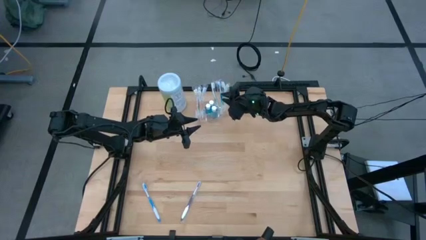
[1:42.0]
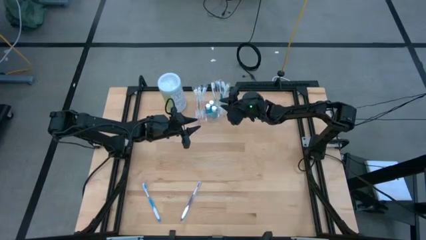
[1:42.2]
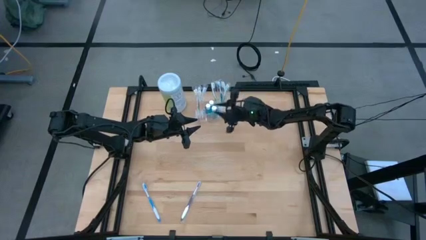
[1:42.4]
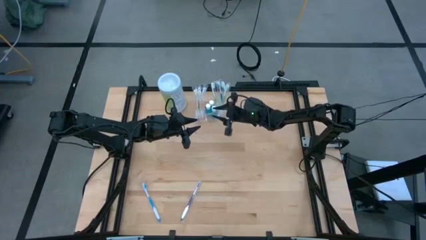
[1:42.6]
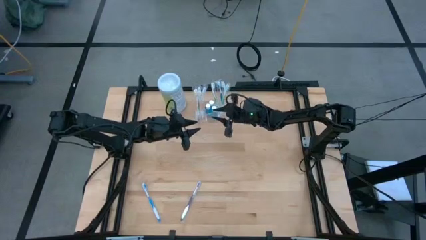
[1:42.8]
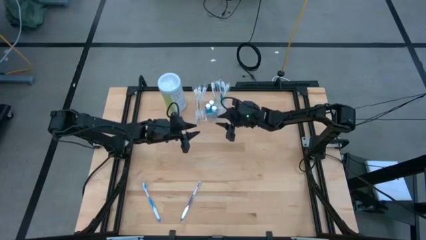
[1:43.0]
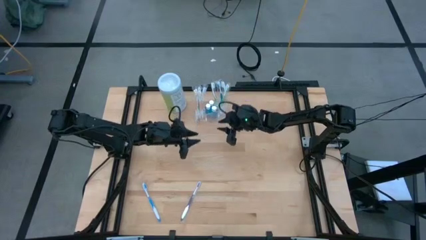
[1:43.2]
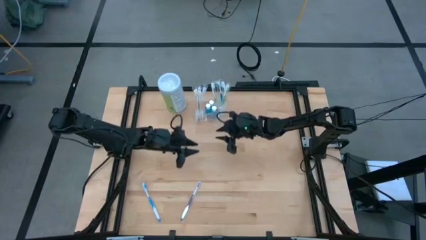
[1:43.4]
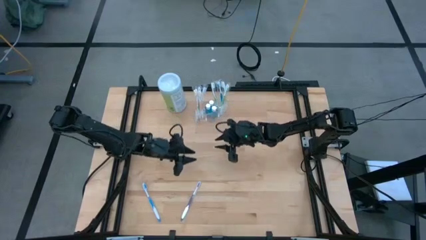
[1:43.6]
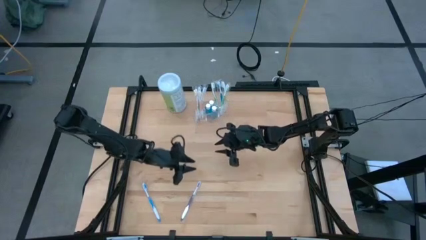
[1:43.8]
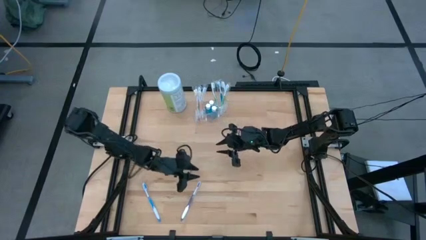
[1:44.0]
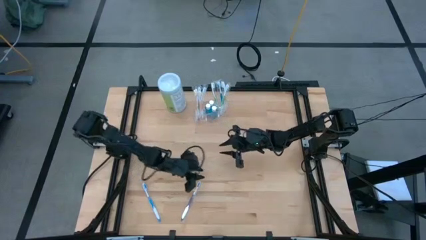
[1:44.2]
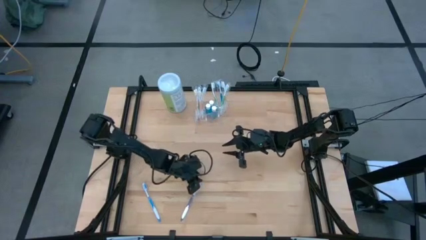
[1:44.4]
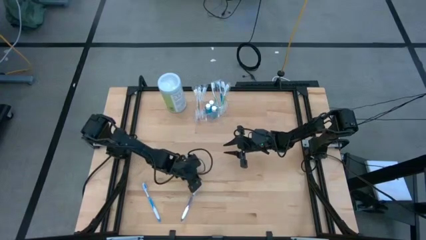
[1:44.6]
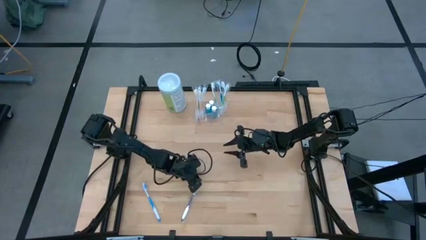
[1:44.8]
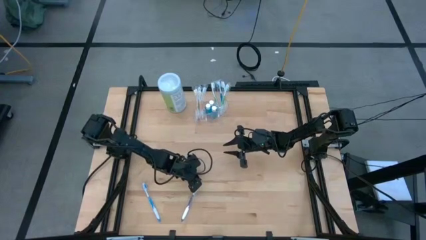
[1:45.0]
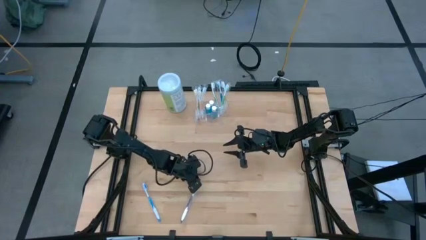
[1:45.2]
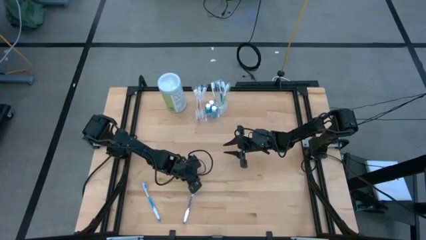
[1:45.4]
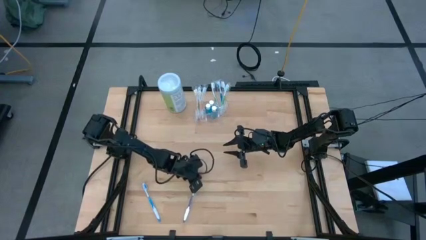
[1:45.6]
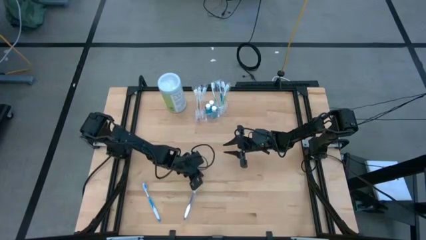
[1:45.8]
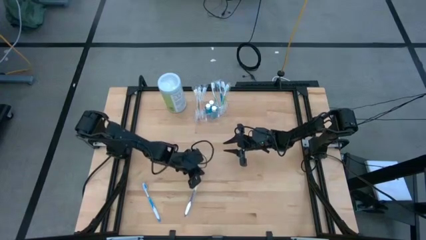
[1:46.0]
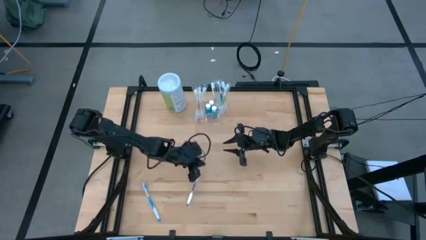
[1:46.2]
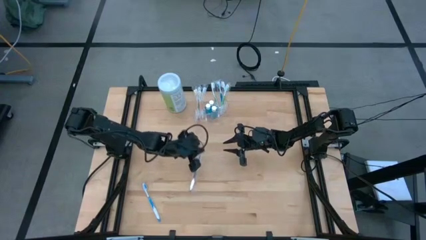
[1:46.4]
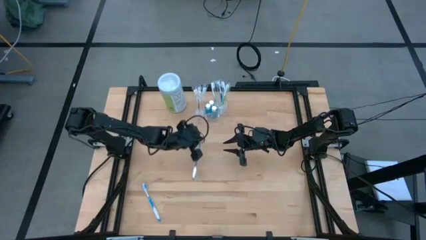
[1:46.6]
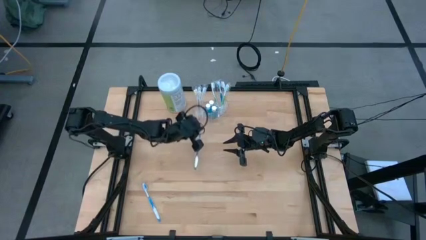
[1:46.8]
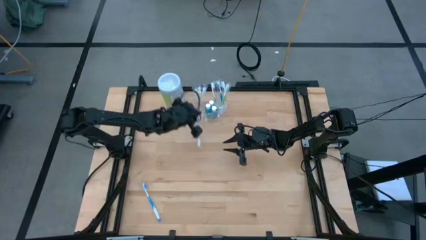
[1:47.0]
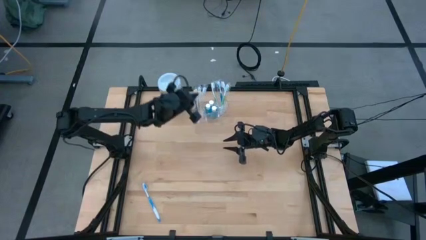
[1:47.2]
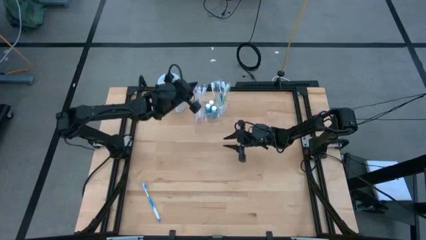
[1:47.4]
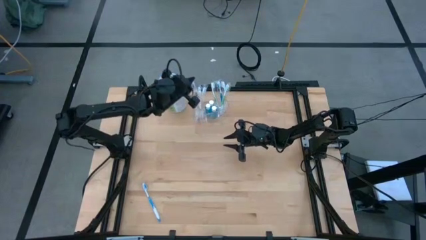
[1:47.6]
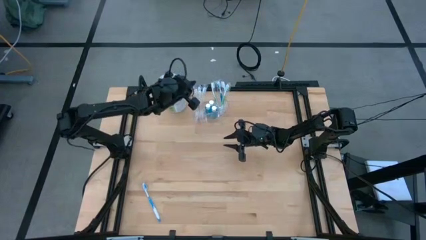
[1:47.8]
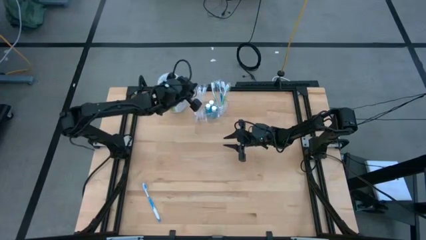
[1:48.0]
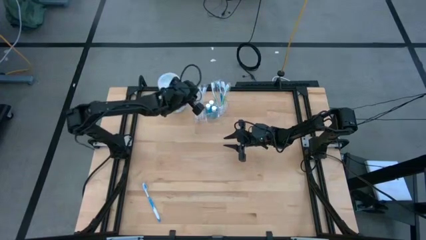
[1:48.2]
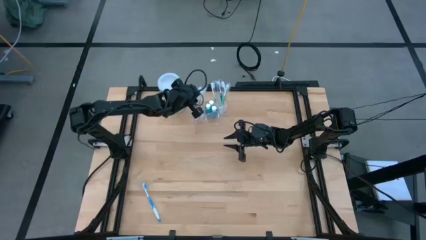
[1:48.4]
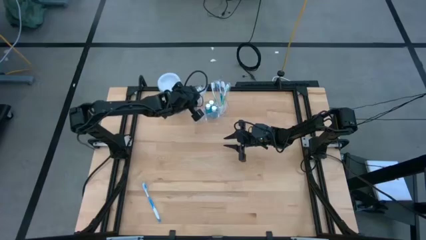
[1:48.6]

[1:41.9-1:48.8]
Task: Pick & Place toothbrushing station
Put the purple toothbrush into the transparent organizer

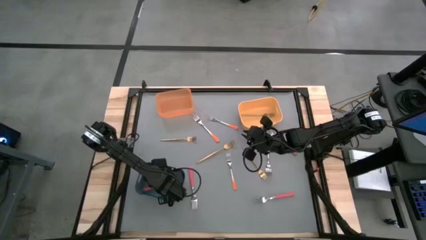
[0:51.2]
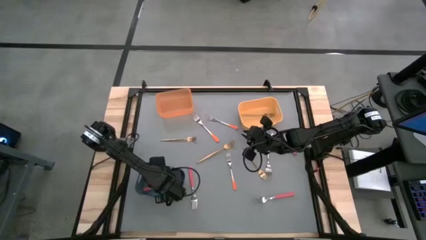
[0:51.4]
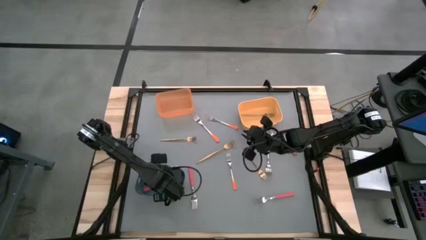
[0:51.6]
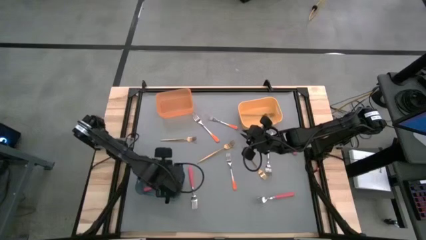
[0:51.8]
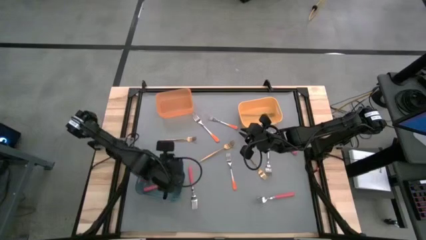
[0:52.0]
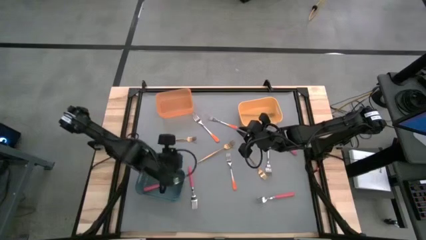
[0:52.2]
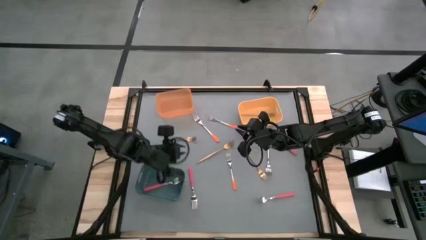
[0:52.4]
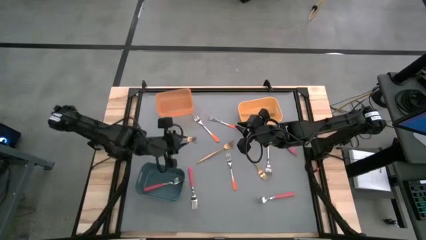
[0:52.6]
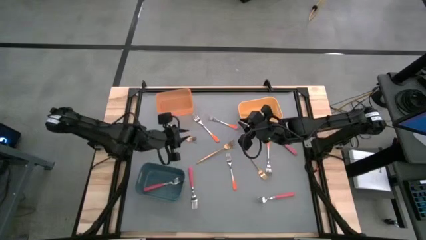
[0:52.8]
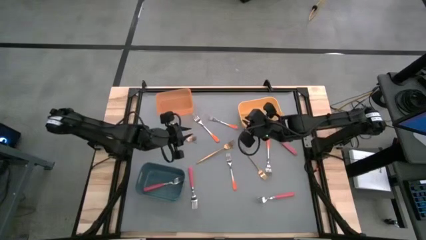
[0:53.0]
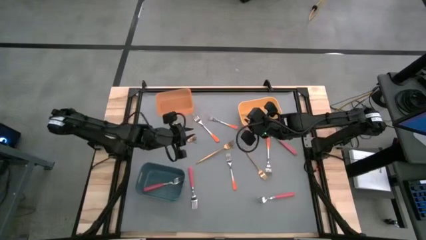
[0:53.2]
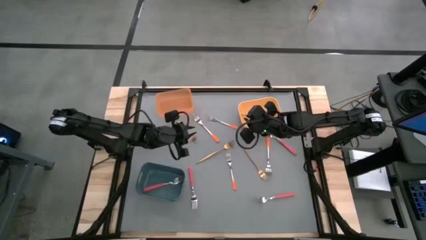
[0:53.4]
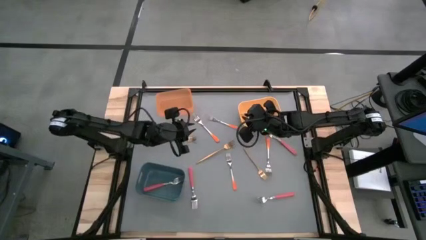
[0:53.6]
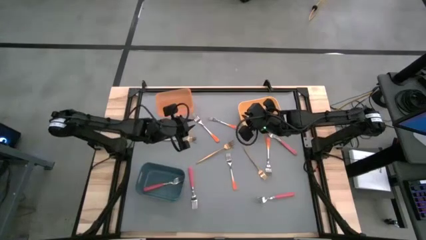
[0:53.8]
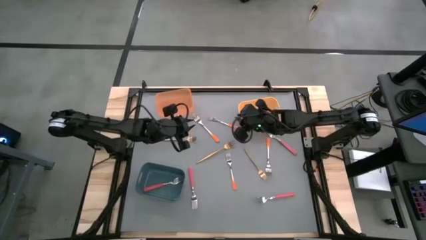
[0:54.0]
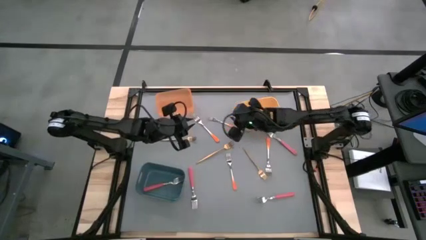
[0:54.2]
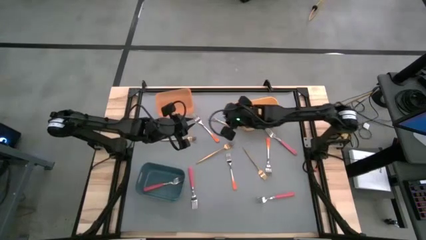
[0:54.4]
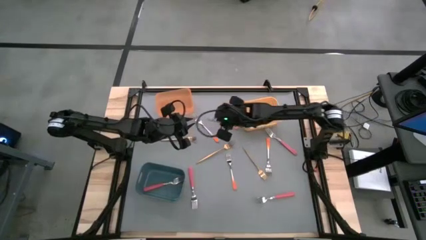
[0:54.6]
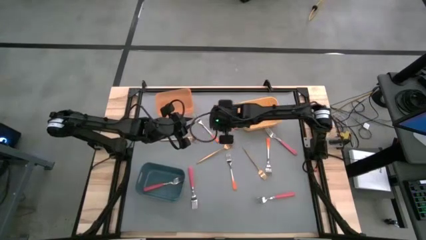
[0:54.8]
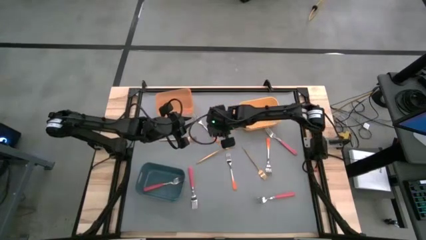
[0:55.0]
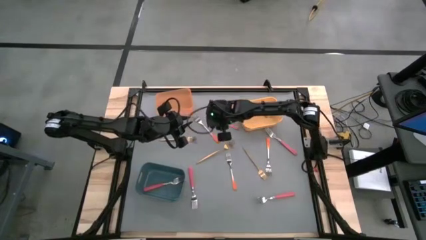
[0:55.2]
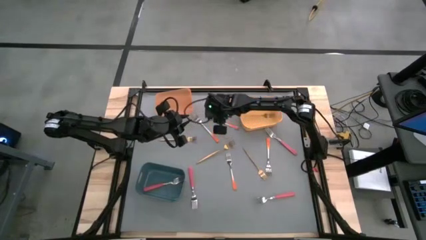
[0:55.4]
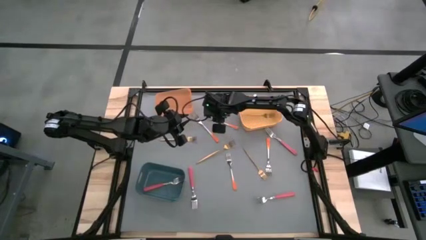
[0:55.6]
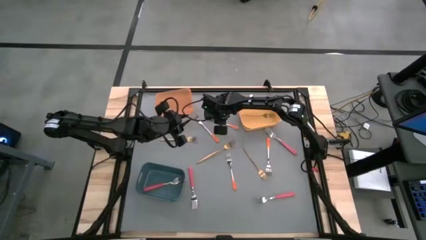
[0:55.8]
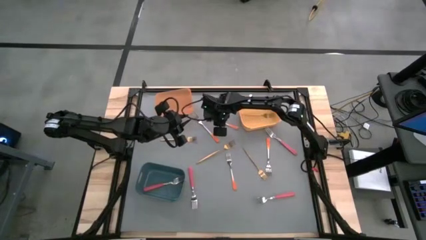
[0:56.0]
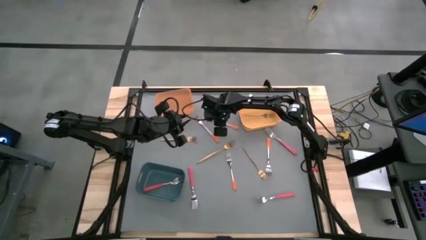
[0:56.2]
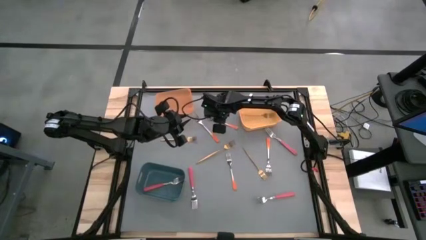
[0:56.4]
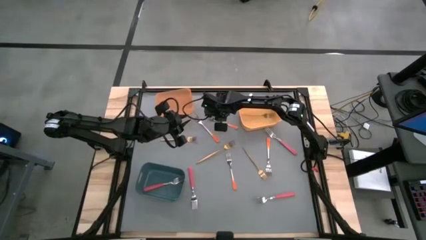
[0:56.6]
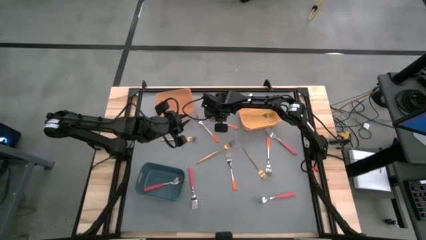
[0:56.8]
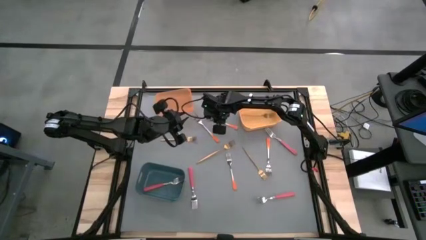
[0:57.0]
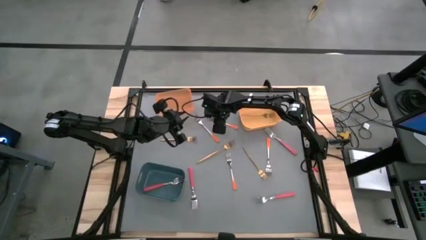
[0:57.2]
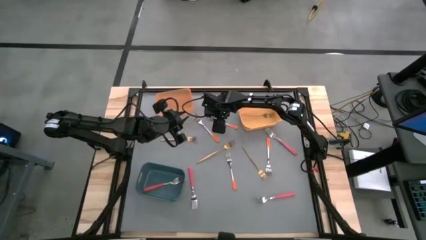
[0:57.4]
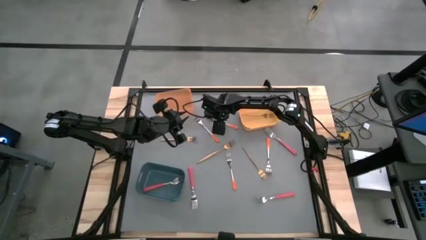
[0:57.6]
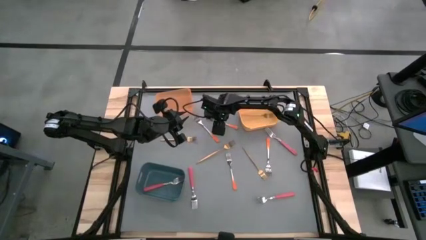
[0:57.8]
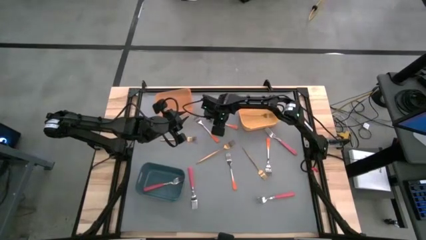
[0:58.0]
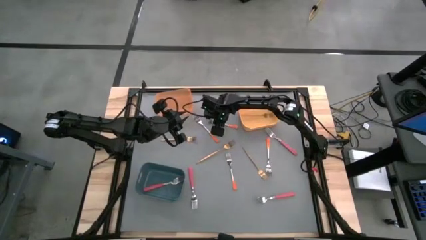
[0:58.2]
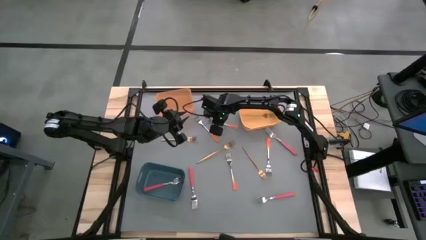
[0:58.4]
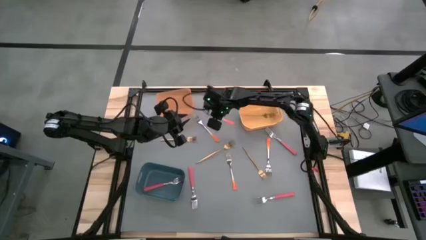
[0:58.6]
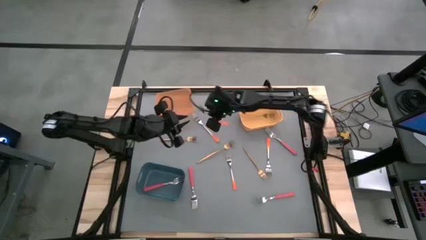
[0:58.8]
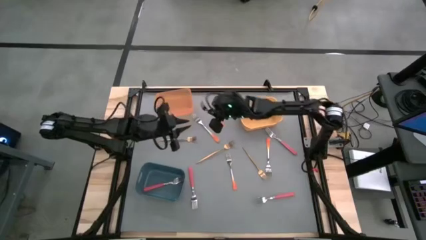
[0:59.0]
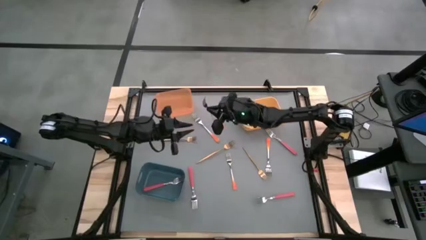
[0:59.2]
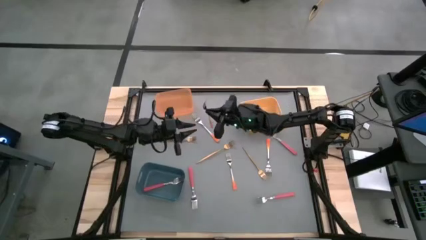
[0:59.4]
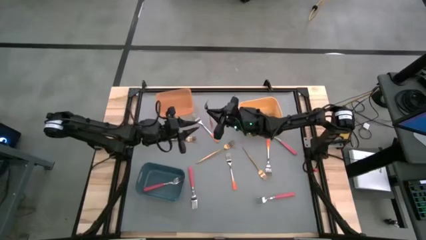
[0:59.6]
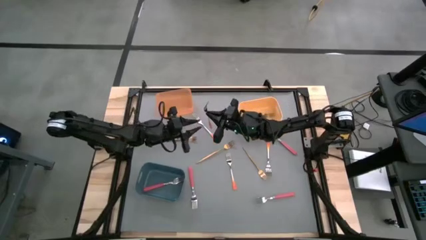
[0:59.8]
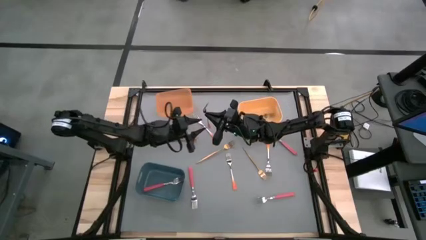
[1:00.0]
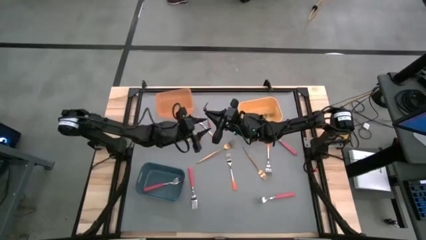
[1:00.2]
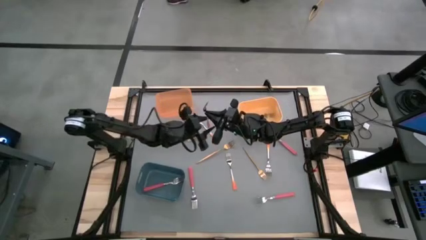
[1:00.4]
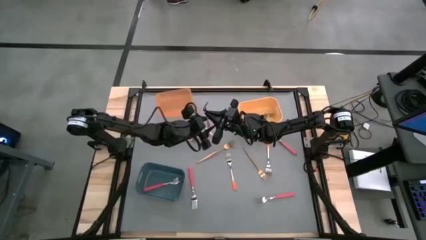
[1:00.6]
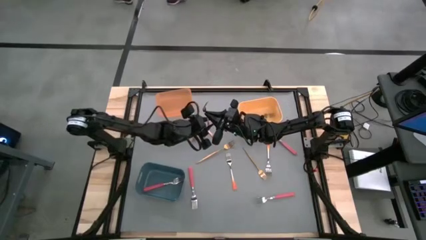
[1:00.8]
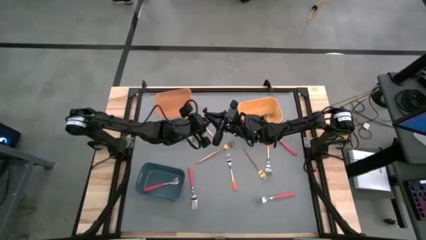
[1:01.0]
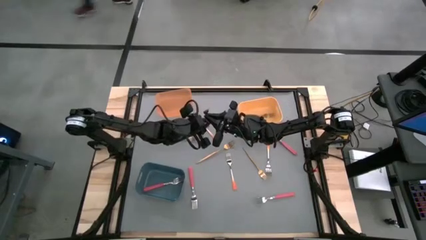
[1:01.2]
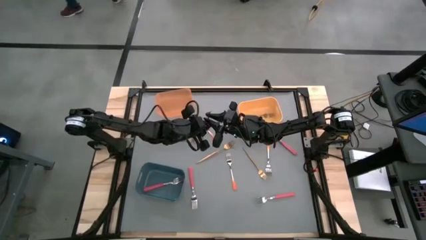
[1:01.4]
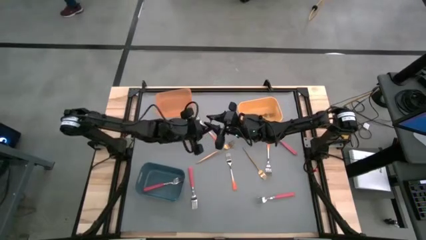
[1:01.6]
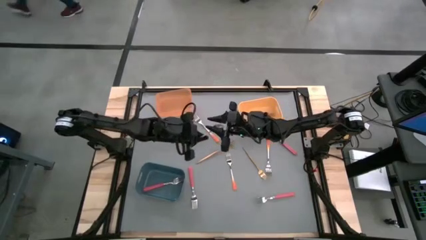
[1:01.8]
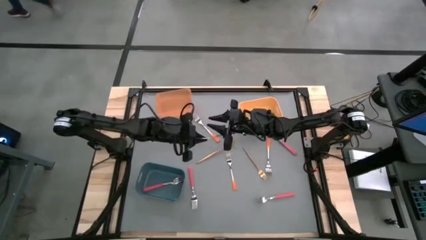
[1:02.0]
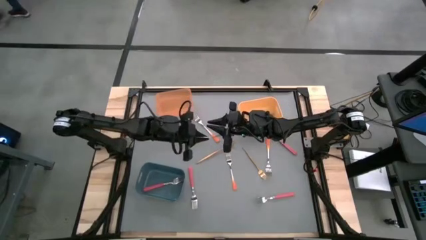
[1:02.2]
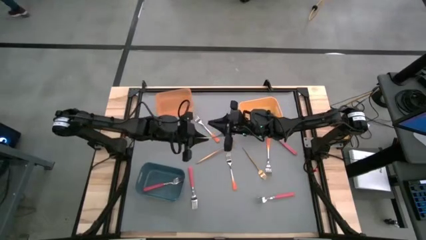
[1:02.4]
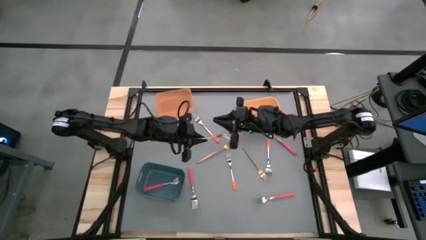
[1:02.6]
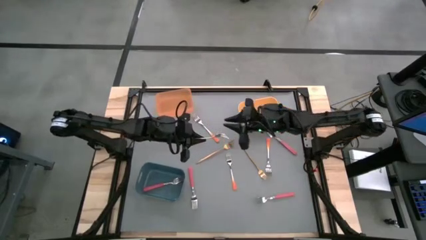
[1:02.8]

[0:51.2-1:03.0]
Task: Sort silverware by color (type)
Put the orange fork into the orange bin
